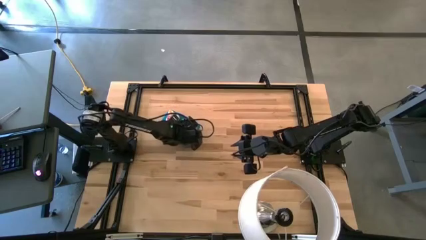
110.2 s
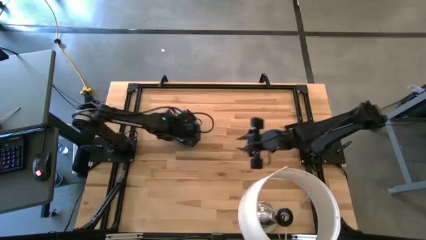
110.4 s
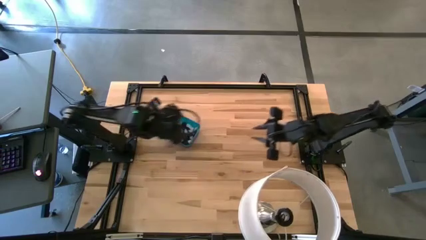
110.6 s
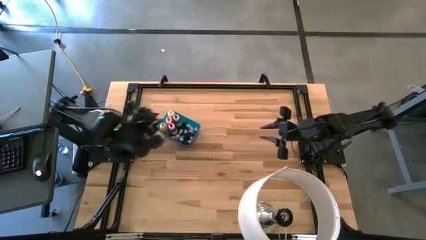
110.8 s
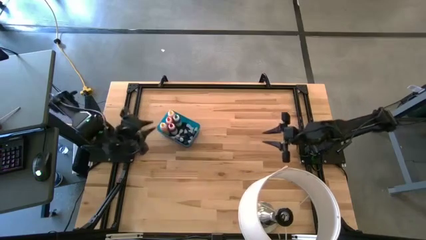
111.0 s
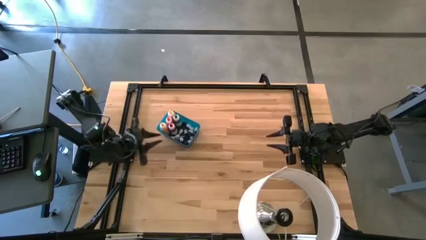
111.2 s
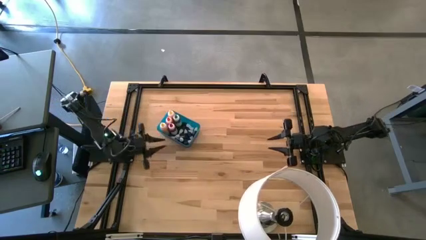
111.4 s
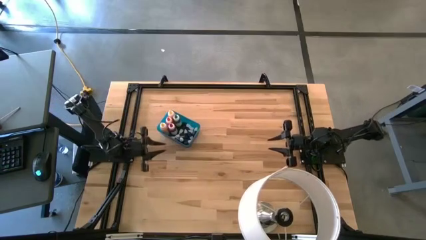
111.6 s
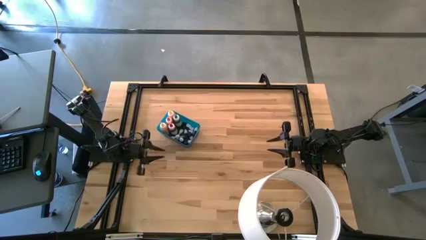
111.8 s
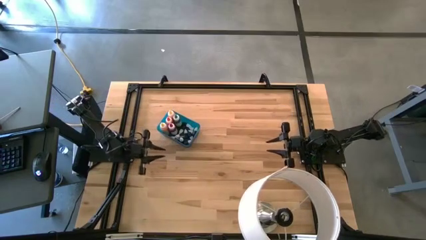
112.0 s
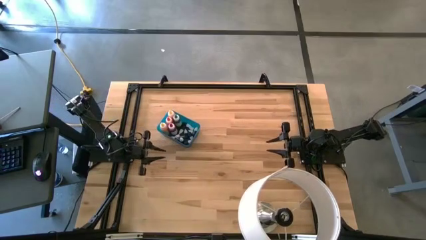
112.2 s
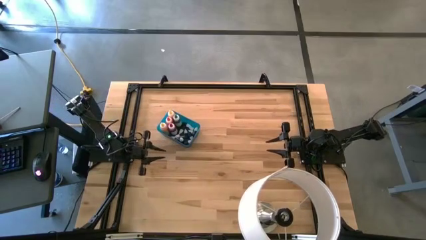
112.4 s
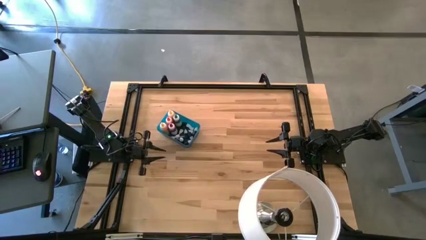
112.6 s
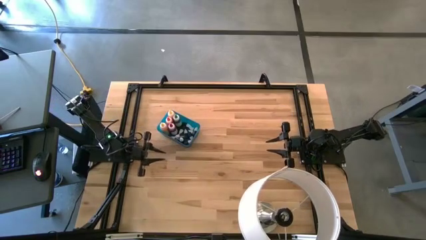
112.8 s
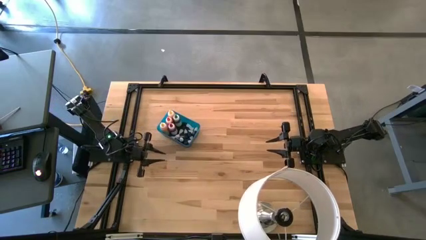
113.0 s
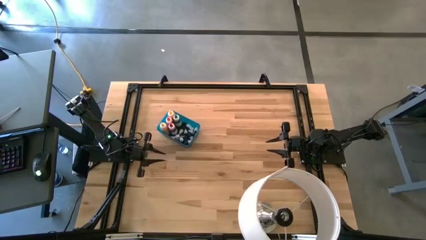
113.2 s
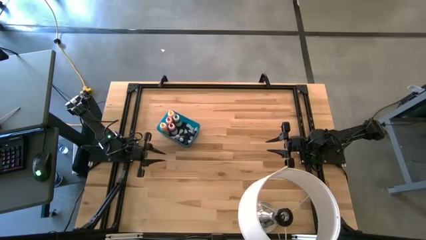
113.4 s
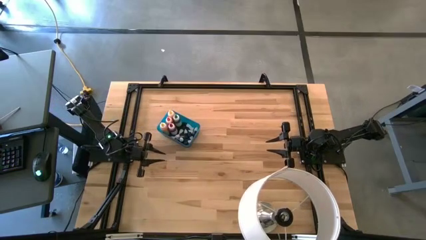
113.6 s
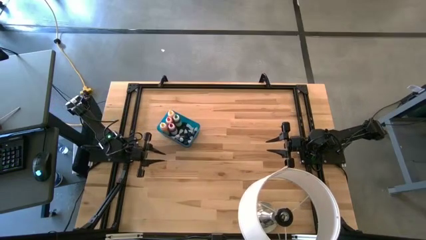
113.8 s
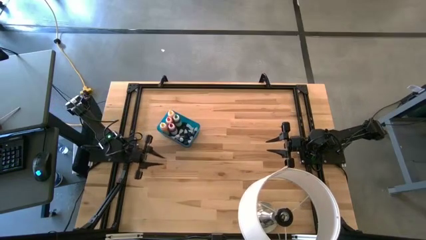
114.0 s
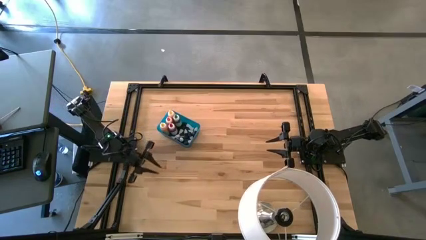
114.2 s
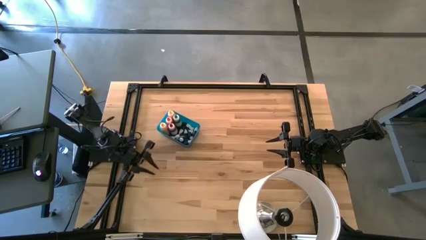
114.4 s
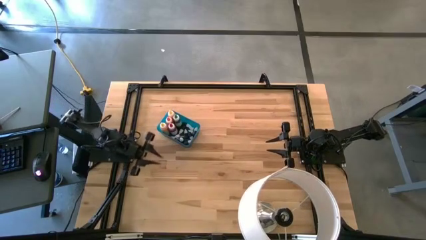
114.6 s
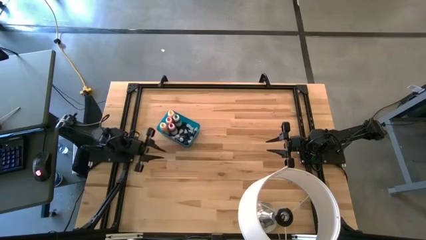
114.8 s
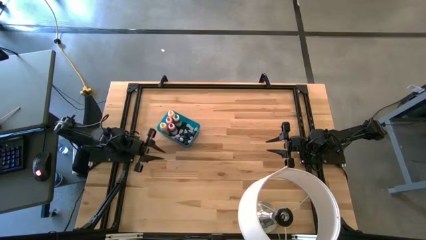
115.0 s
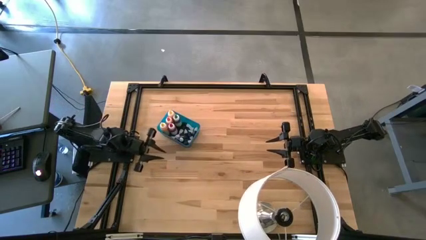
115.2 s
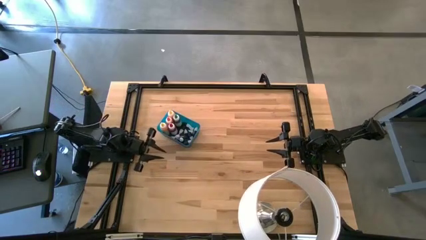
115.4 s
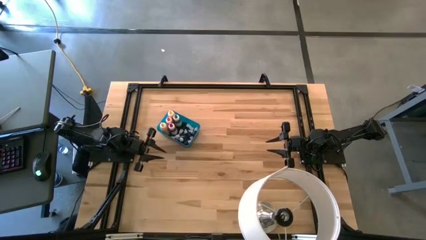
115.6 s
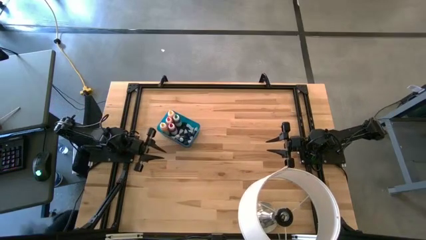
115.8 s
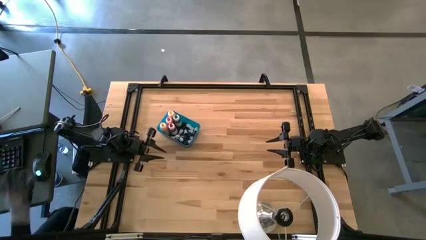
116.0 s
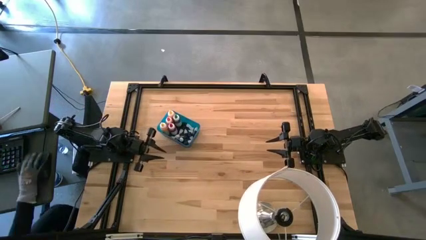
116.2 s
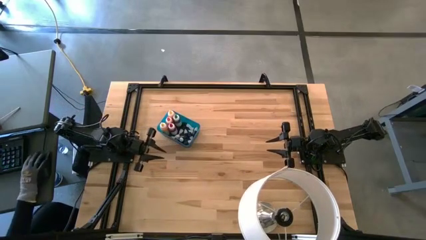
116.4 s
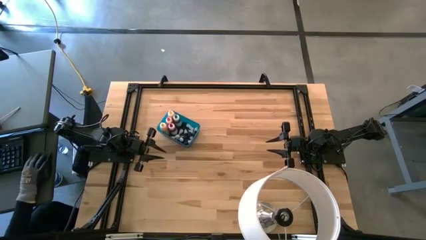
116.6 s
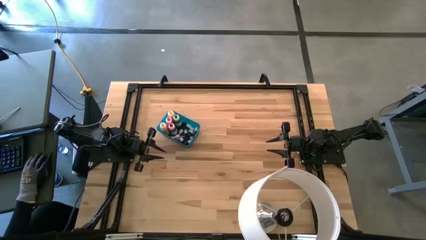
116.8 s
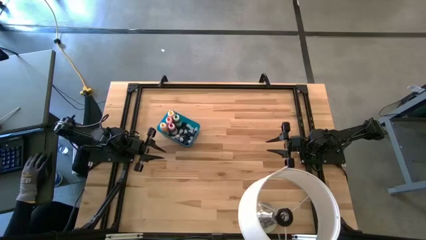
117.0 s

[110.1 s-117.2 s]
Task: Pick & Place food coloring
Return to Home Position

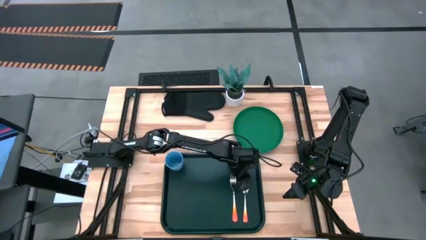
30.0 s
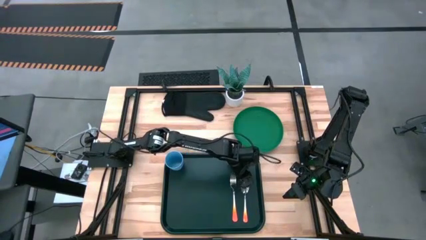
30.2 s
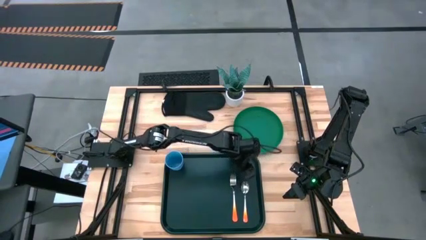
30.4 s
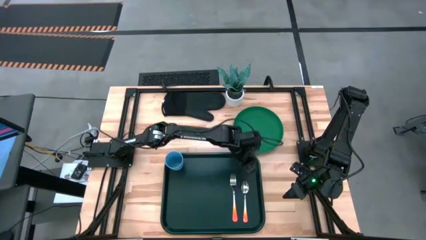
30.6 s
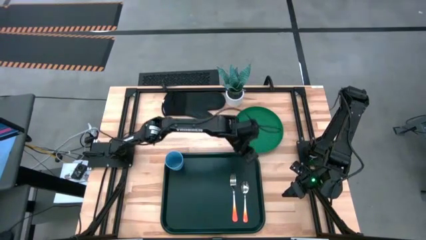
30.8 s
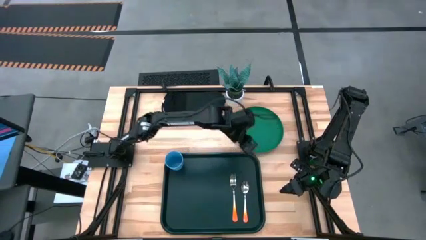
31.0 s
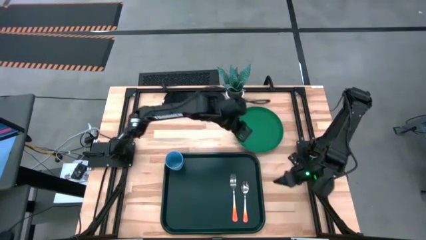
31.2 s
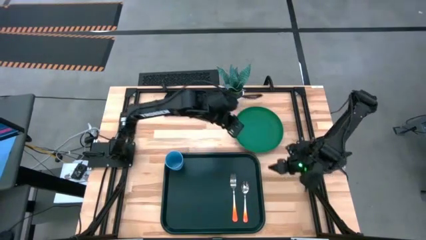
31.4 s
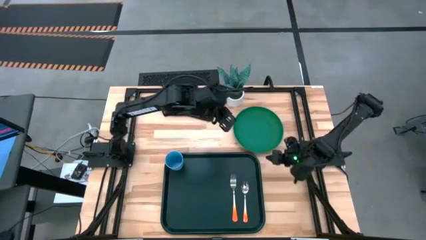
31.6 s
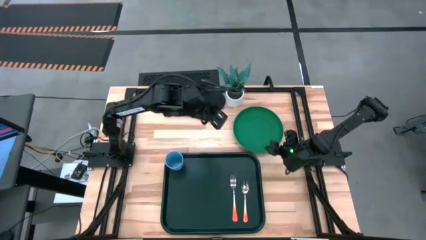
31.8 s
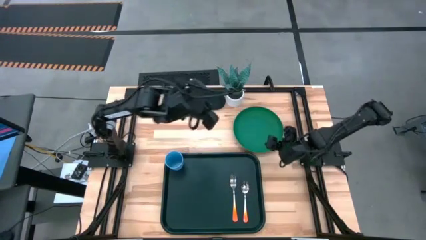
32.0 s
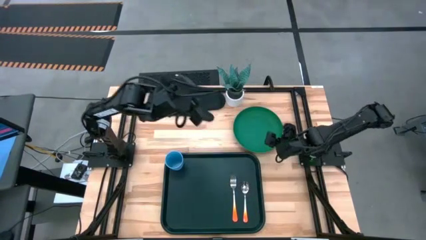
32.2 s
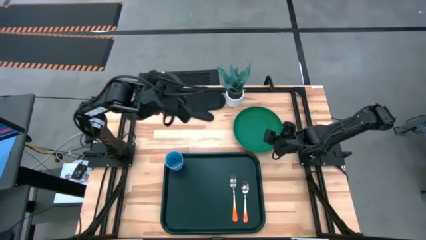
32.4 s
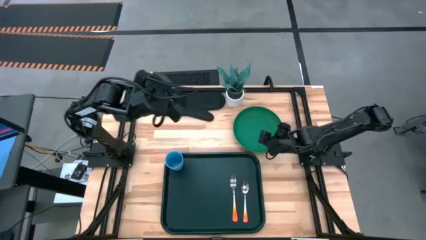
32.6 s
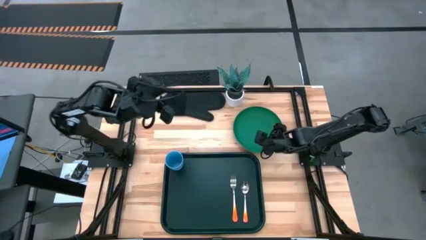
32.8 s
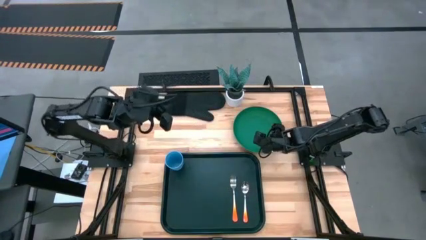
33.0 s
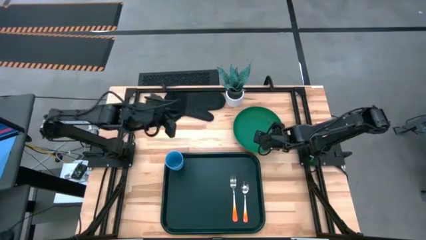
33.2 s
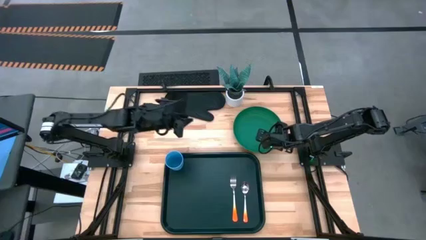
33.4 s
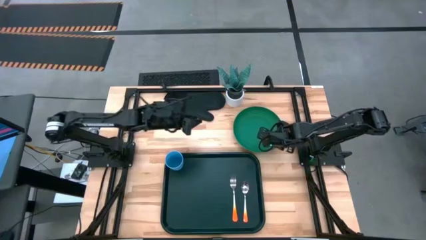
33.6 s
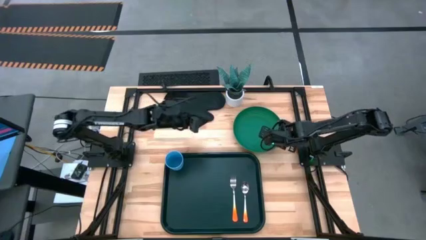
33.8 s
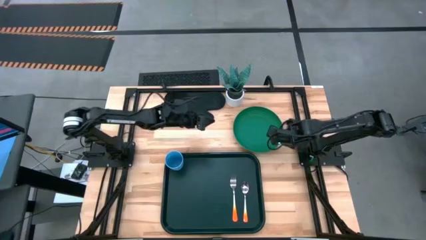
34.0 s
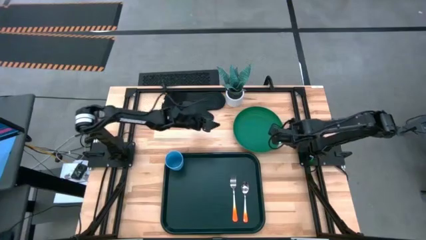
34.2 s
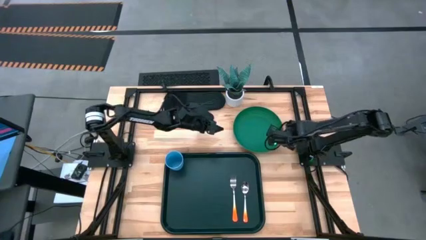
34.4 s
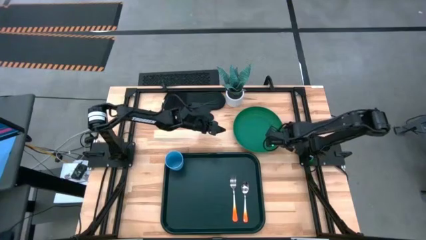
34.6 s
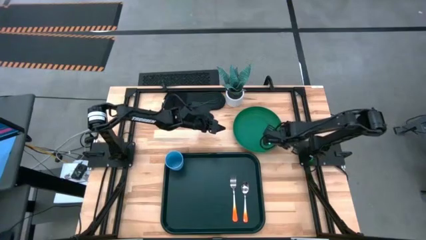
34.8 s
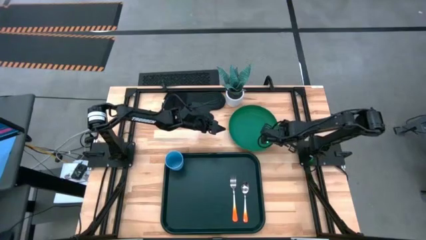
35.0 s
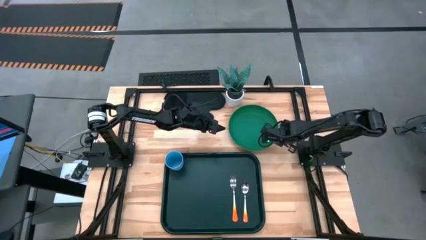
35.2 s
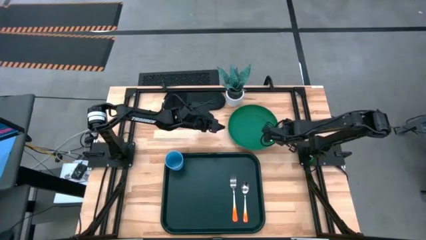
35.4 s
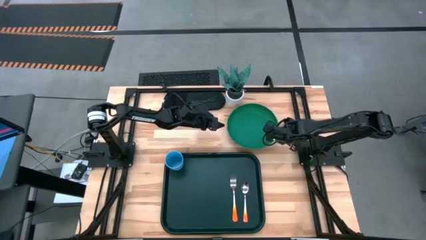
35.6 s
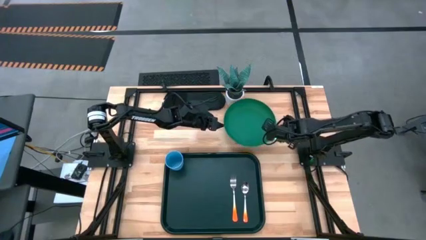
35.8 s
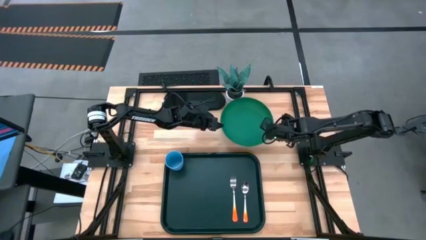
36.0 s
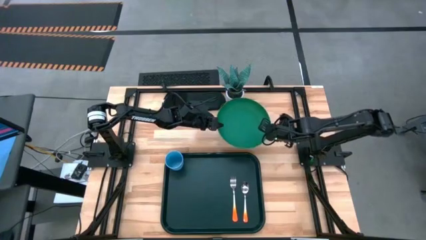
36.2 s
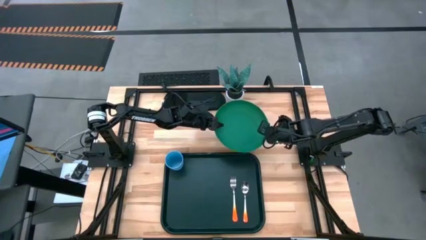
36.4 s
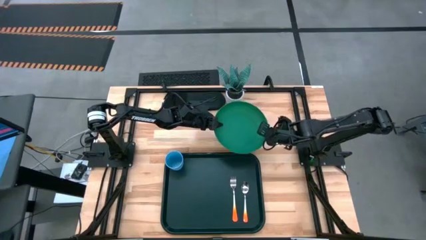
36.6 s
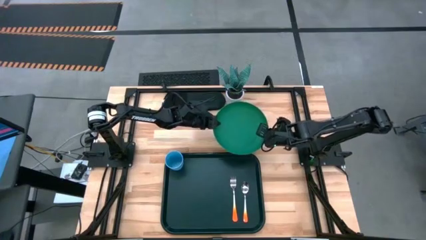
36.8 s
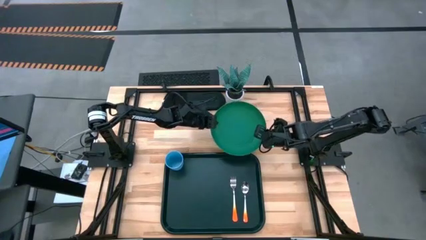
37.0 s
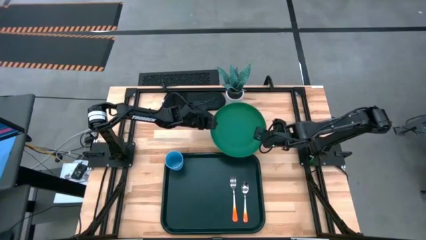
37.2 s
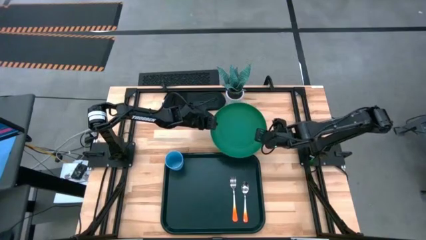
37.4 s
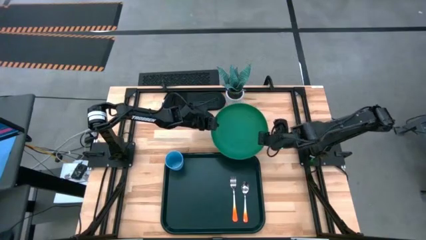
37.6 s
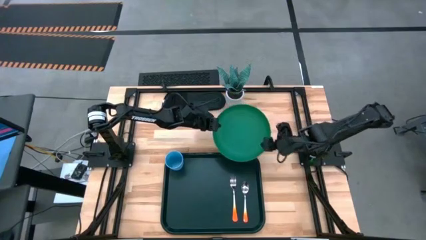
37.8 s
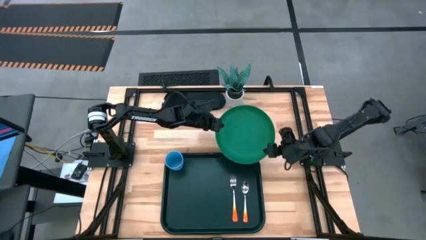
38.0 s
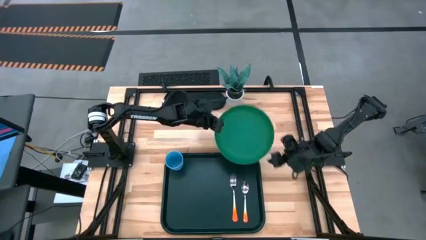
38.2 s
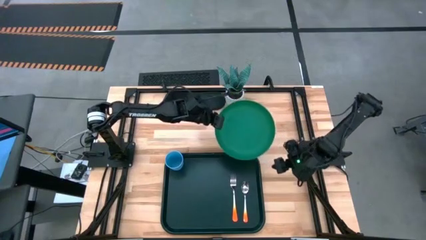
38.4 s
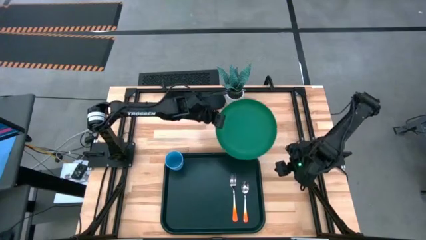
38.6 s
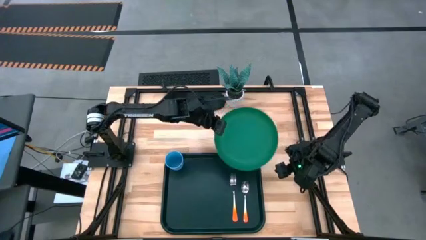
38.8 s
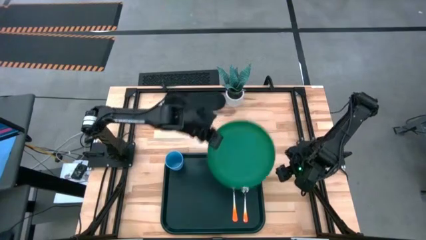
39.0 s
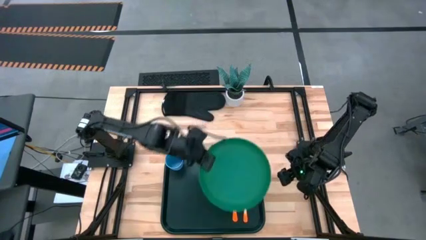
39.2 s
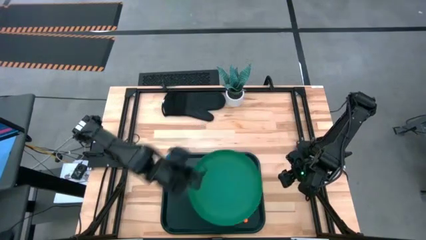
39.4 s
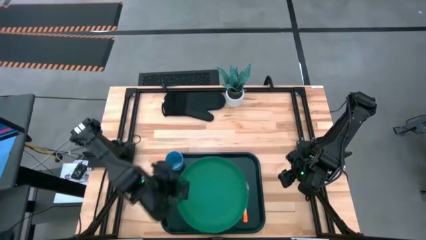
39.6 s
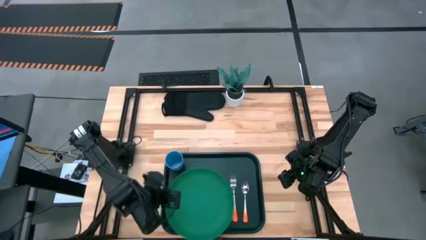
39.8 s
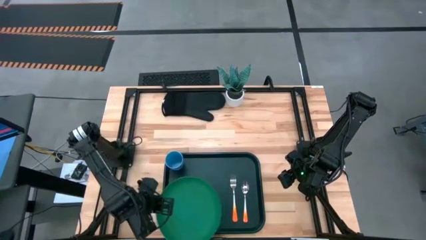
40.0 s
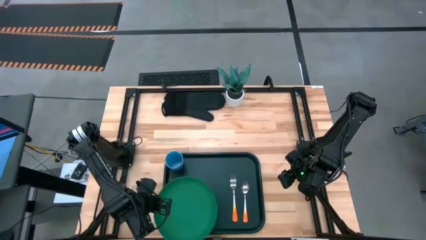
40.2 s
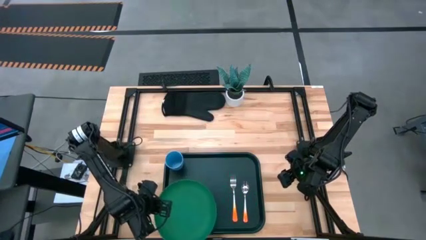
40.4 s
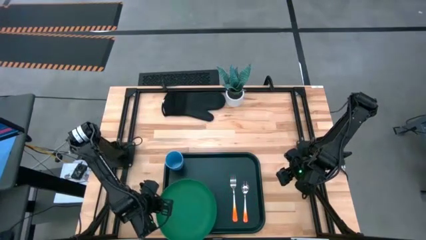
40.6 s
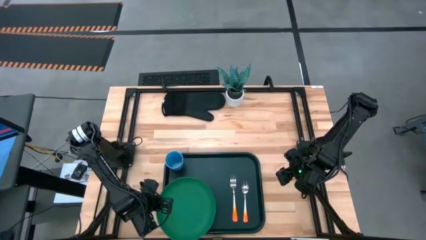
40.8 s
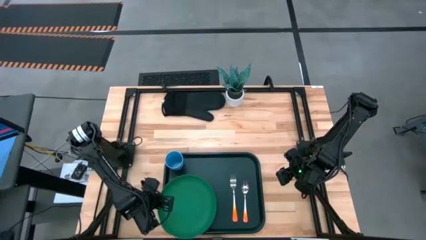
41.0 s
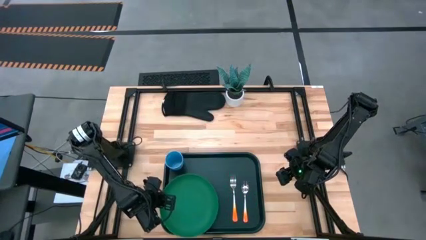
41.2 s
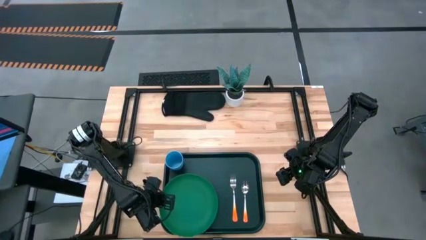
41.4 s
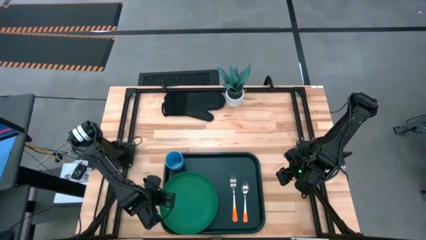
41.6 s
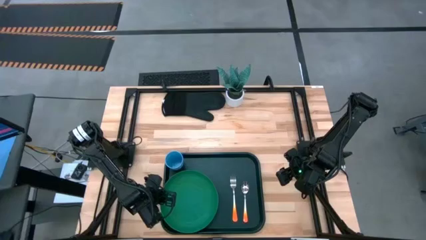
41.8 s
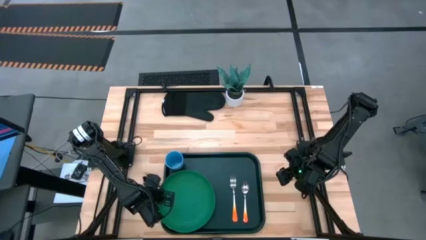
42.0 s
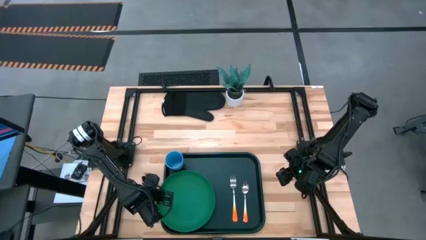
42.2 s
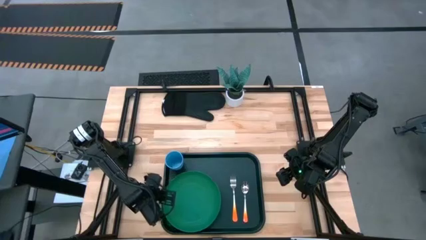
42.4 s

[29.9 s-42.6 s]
Task: Pick and place plate/cup/fork/spoon on tray
Put the green plate on the bottom left of the serving tray
